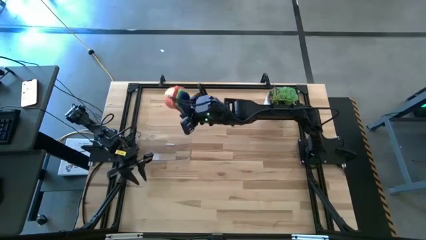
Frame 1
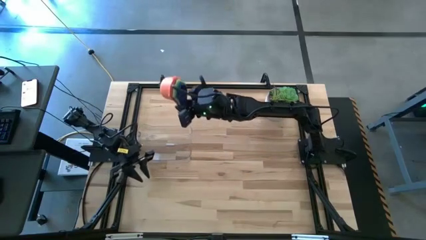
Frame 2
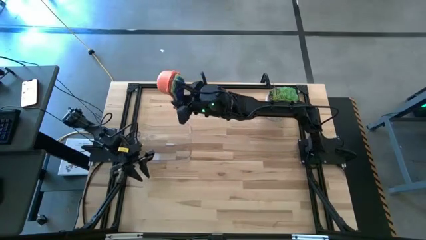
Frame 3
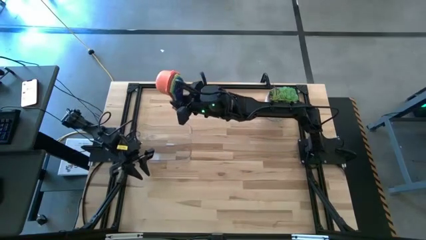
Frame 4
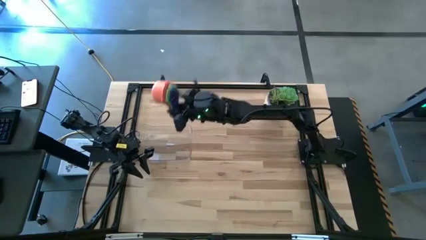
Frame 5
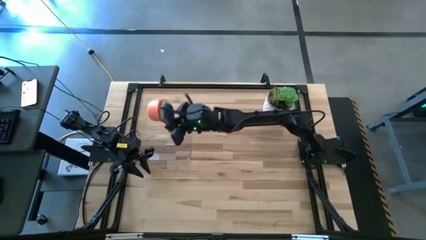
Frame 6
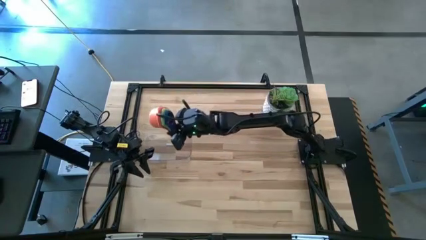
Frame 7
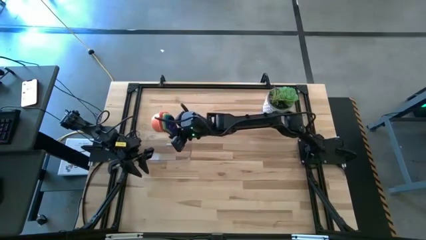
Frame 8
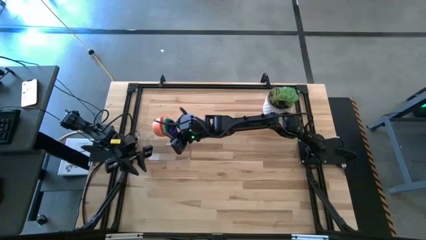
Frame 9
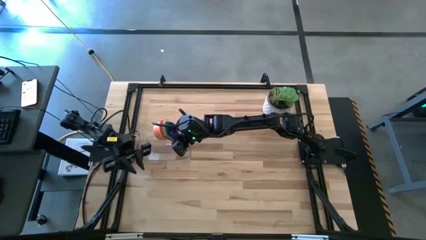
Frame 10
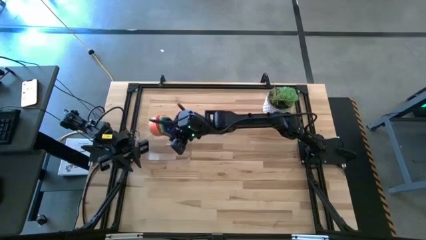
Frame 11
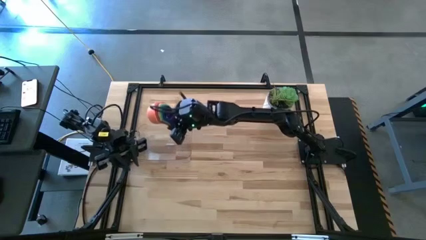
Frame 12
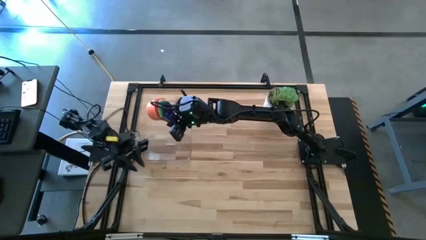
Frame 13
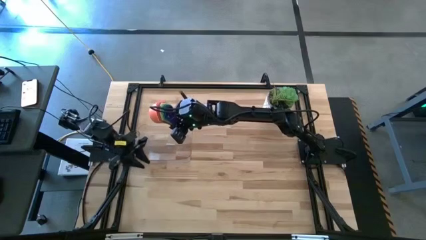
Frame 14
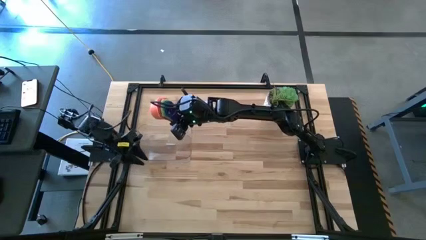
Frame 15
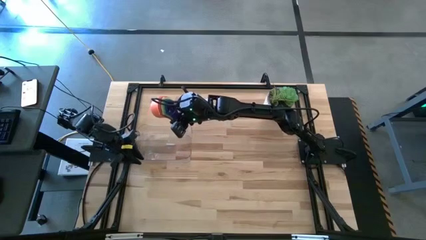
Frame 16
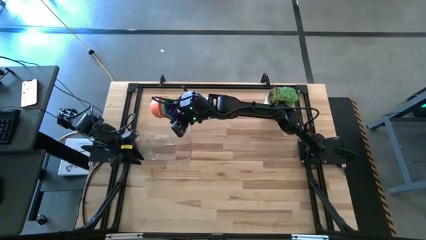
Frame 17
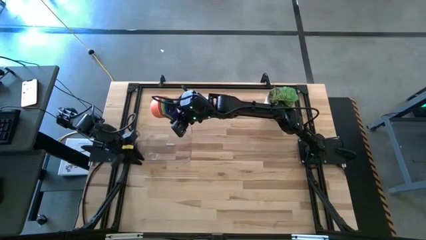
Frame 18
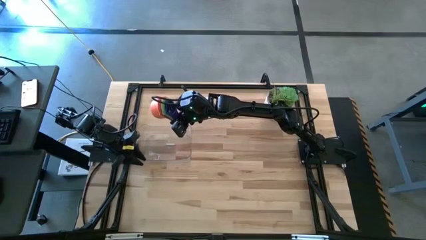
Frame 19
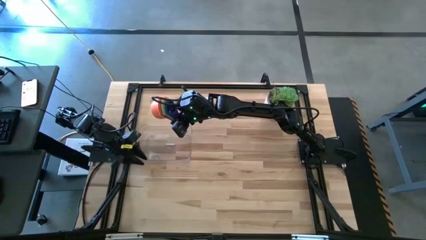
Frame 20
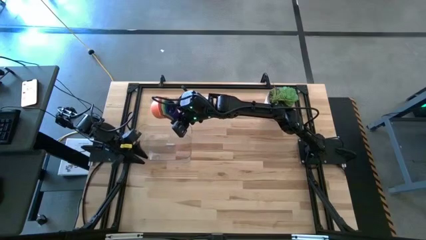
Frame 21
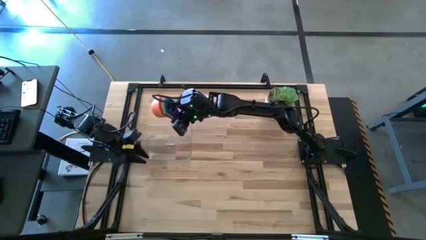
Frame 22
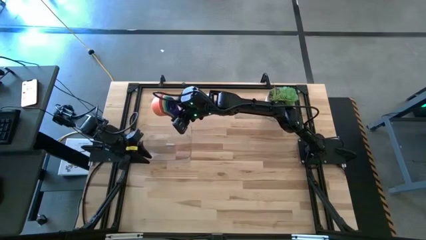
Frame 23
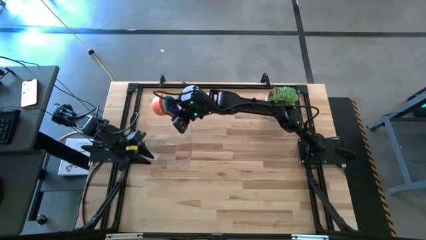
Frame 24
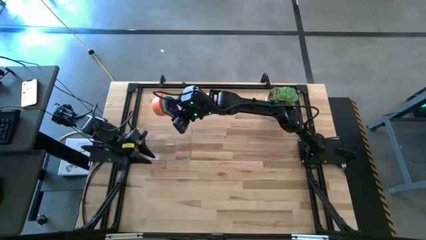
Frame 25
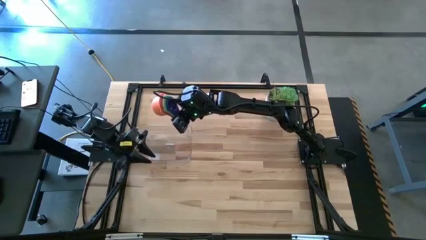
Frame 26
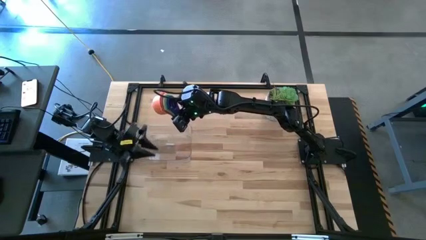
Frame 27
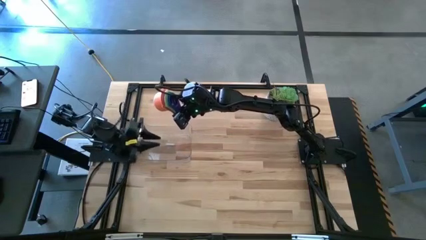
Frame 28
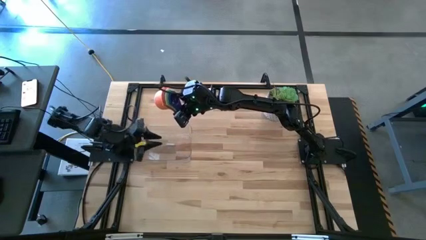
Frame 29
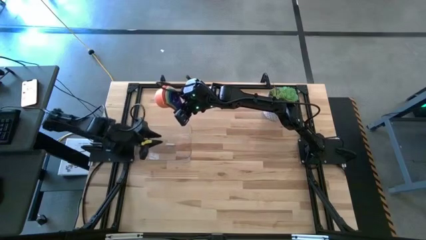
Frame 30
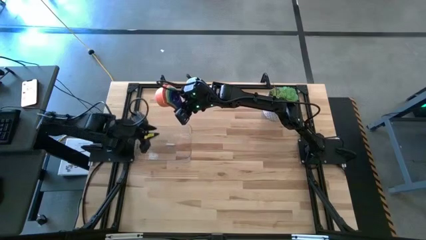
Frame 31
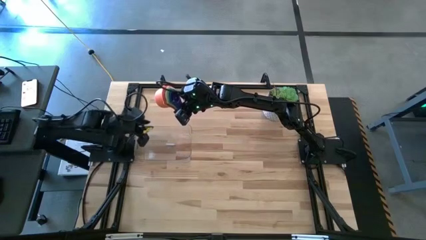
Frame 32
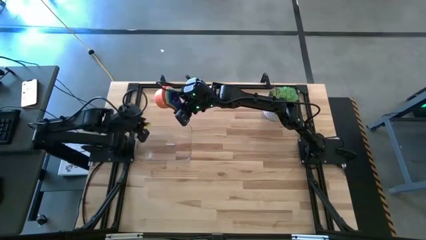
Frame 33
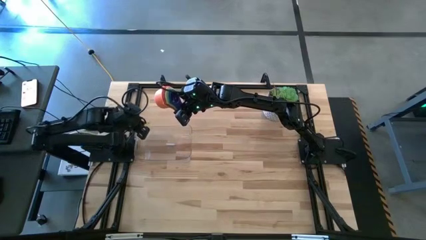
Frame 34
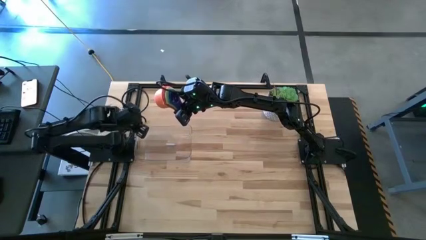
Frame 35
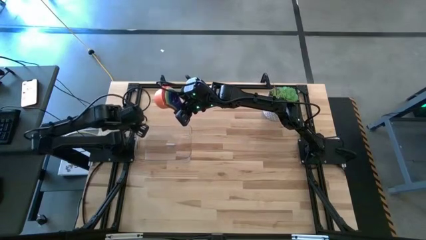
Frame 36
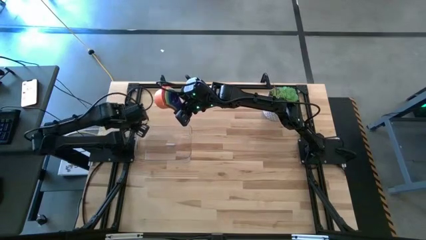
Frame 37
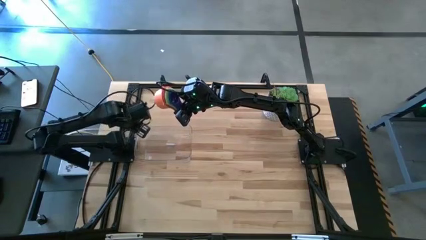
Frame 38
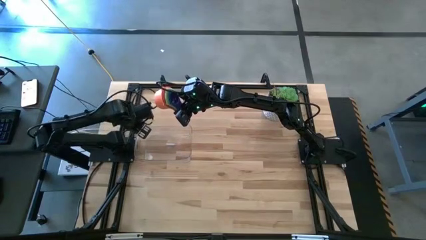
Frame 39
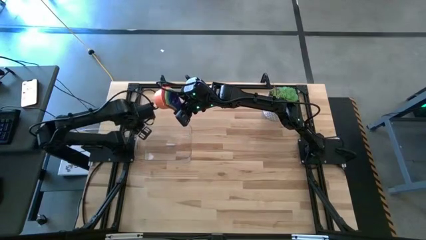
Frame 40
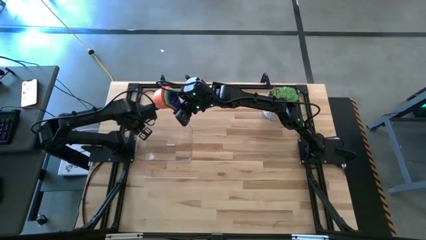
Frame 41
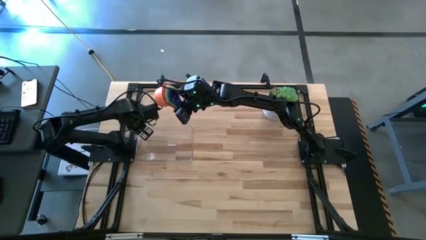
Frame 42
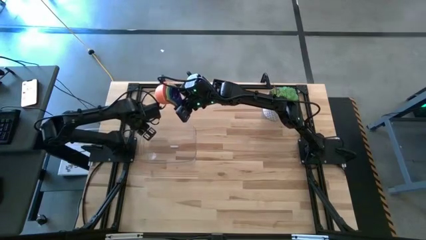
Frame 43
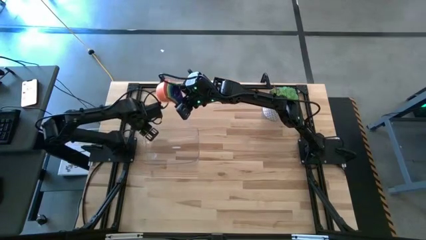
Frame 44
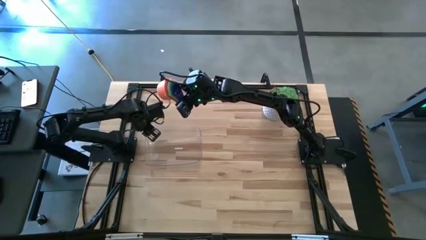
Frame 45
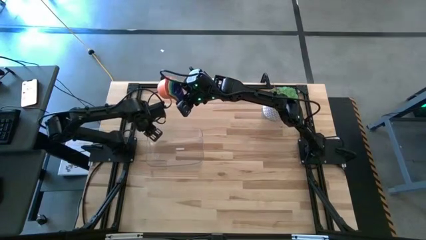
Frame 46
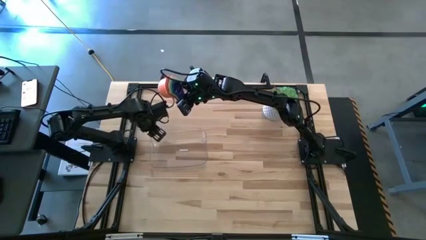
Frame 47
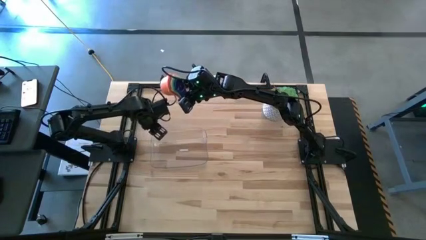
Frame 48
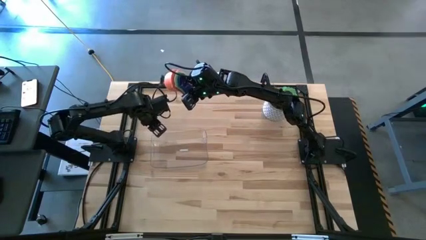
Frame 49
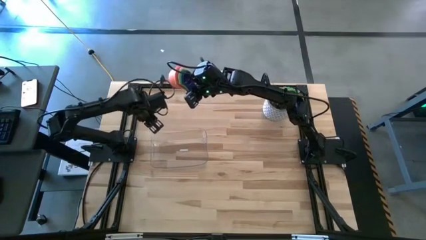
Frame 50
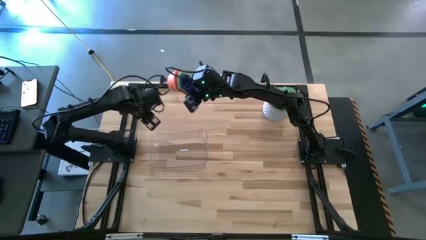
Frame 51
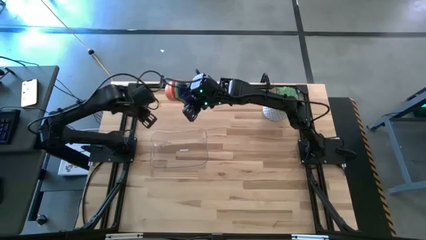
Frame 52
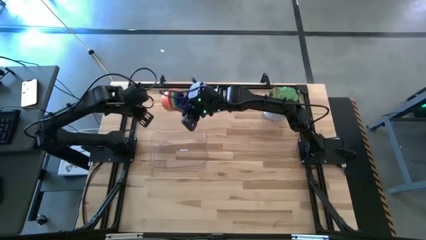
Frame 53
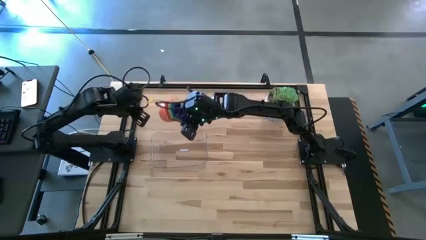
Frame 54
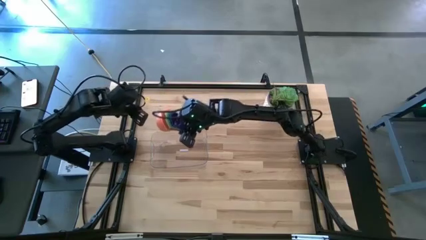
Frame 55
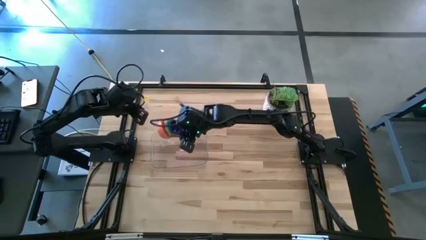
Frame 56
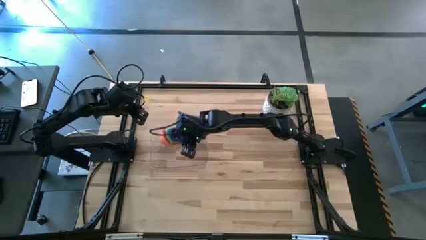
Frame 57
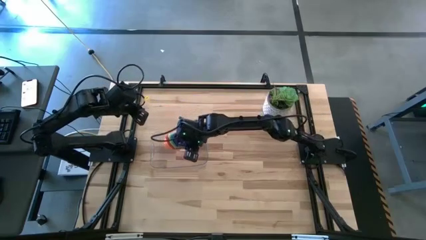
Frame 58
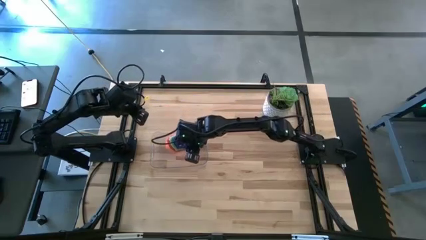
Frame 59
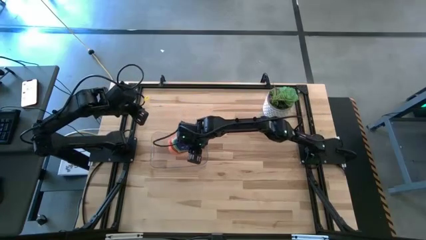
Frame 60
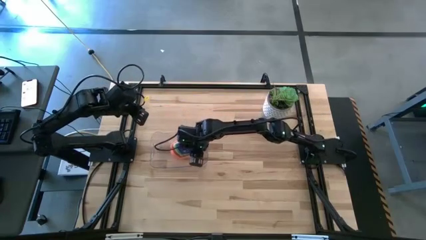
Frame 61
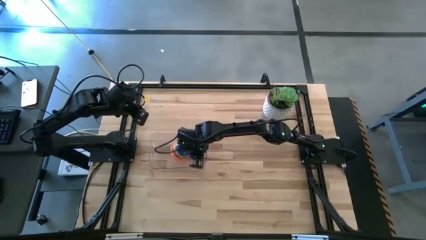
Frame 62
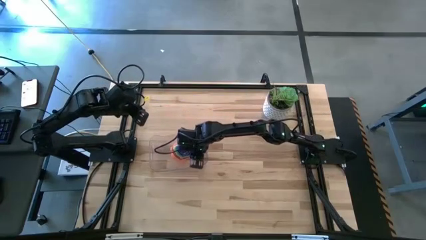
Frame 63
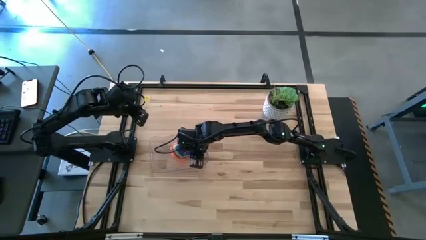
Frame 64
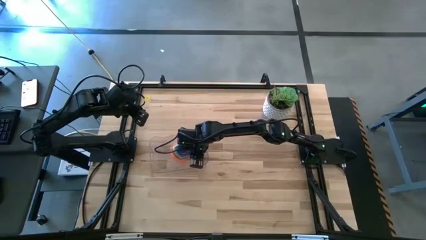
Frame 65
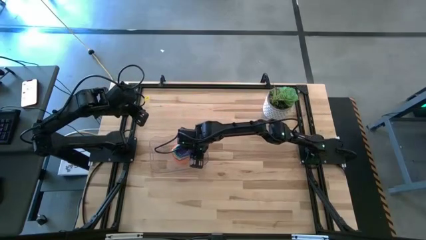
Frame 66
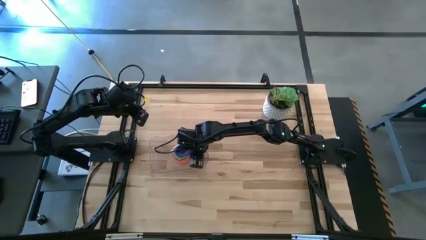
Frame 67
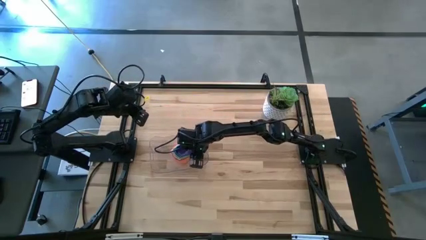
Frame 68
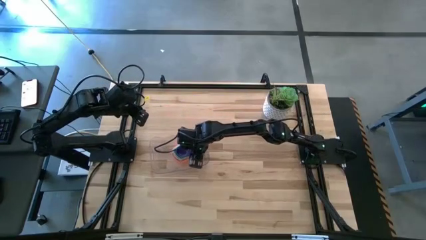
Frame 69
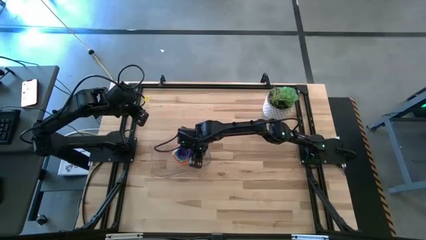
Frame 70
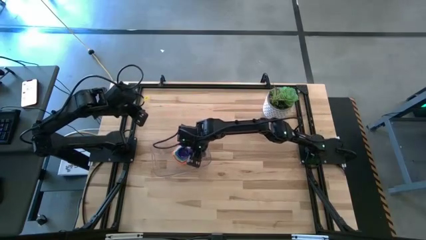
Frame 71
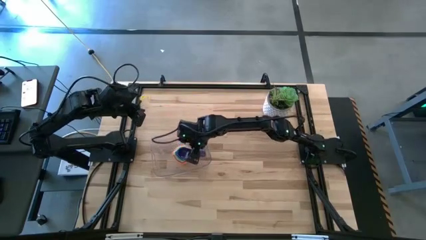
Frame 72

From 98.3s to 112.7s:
Task: Nest measuring cups in basket
Put the measuring cups on the transparent bin

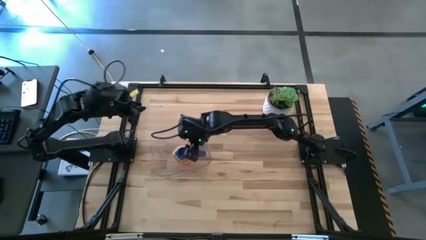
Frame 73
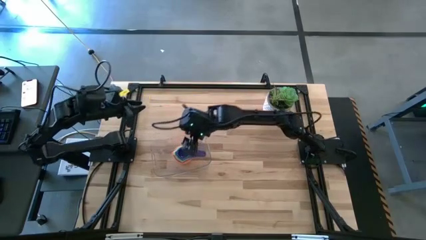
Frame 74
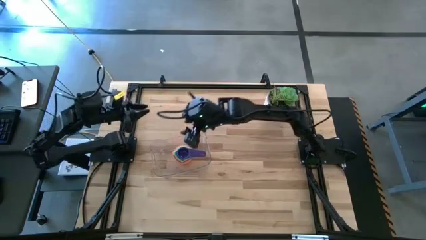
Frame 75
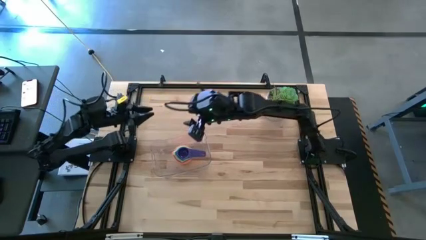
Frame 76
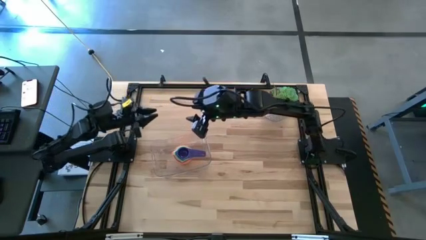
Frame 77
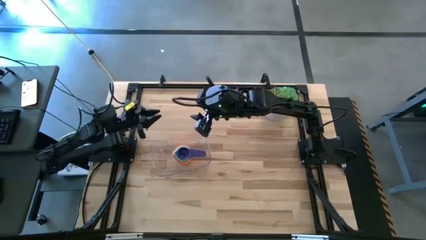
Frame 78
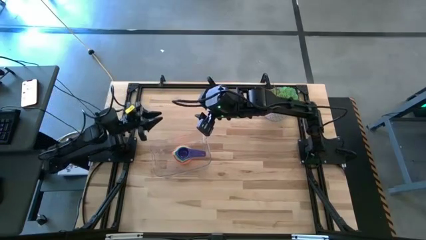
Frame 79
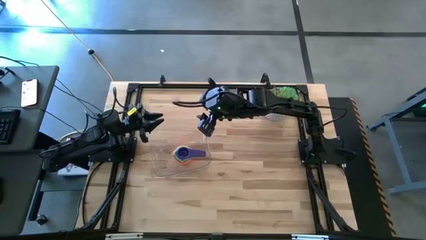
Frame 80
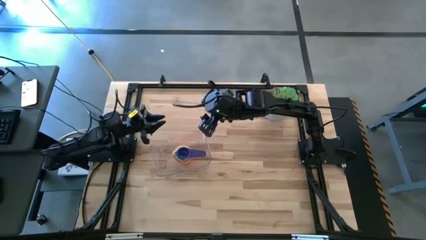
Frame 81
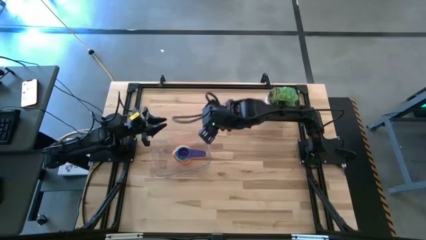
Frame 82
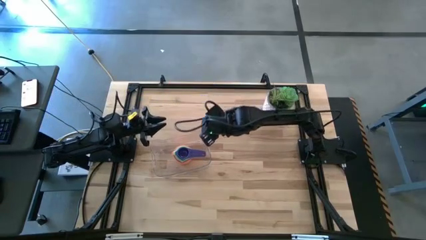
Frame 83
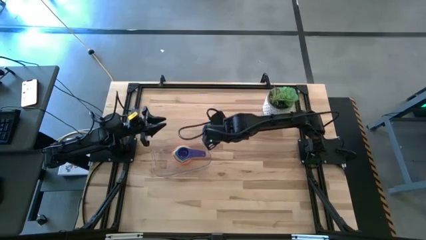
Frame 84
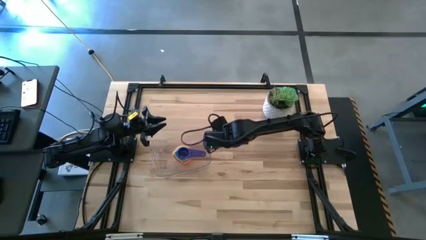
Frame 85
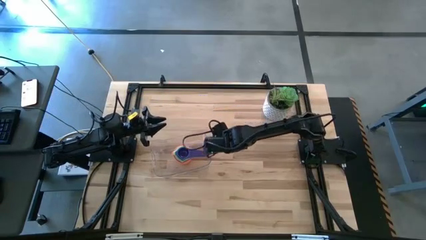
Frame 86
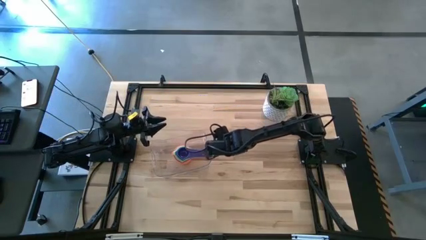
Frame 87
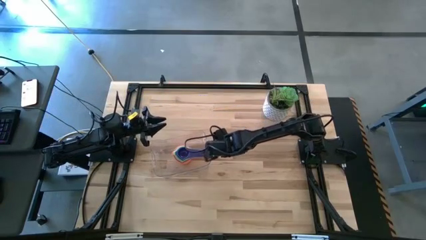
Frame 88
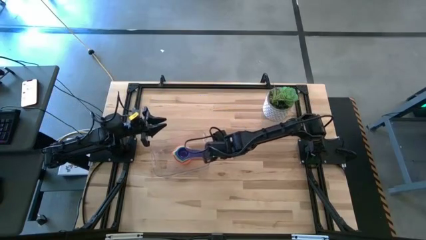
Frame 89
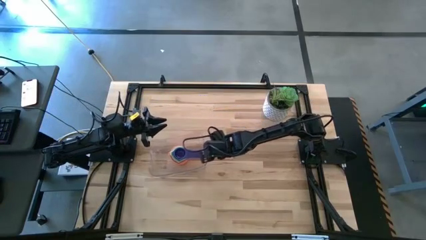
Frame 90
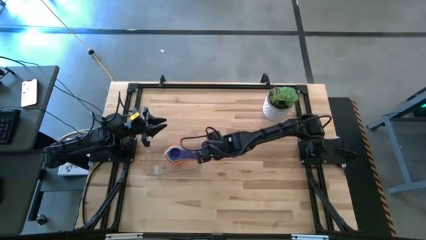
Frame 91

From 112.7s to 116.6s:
Adjust the transparent bin
